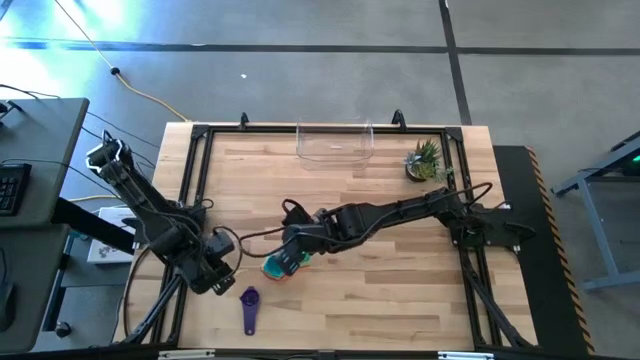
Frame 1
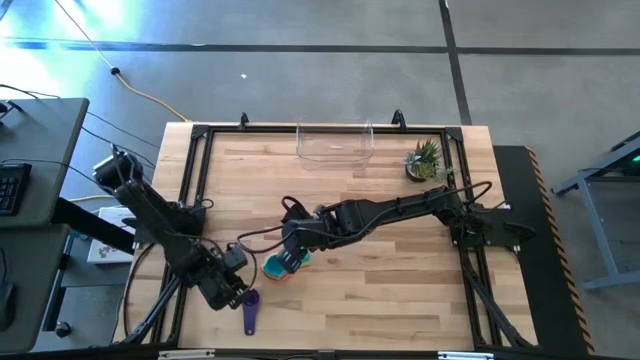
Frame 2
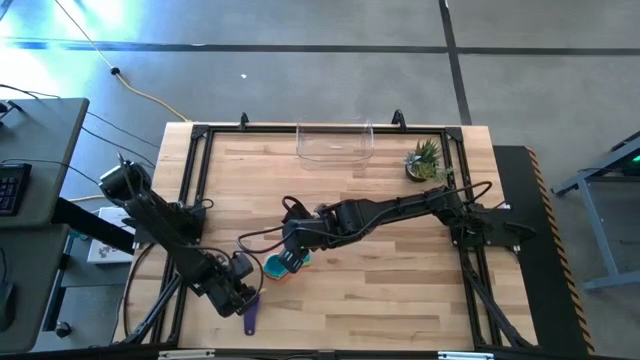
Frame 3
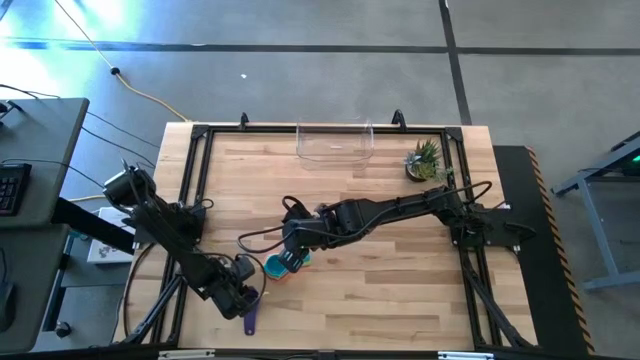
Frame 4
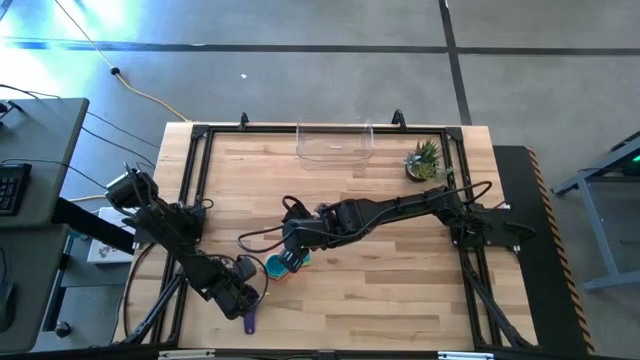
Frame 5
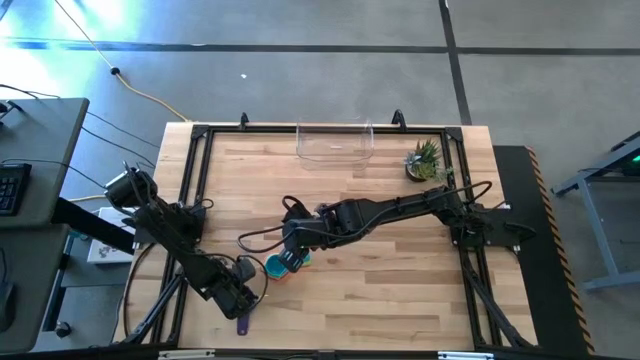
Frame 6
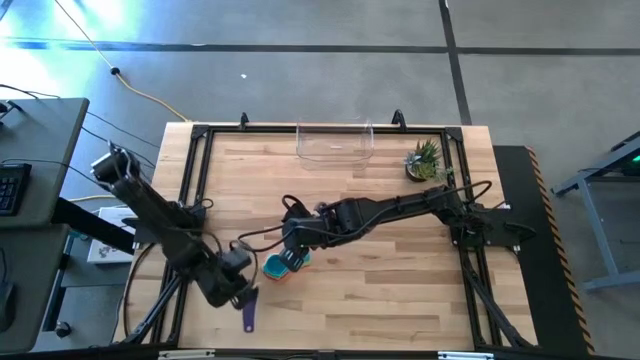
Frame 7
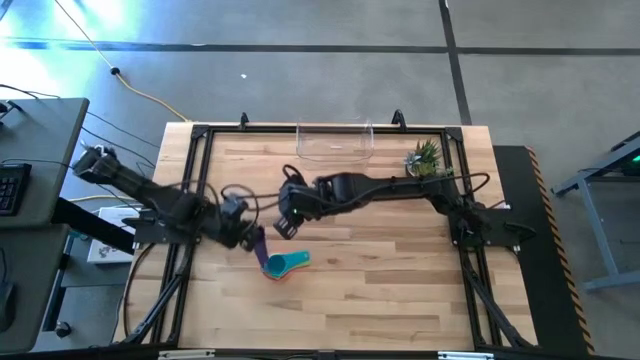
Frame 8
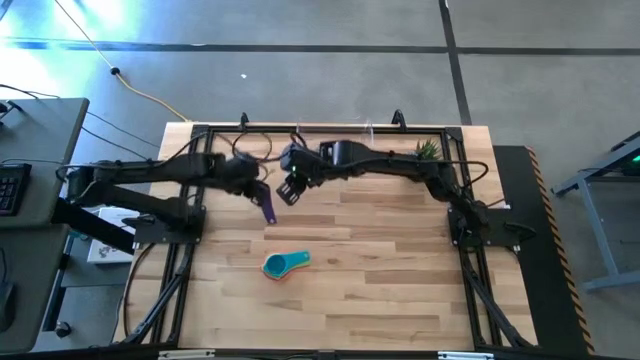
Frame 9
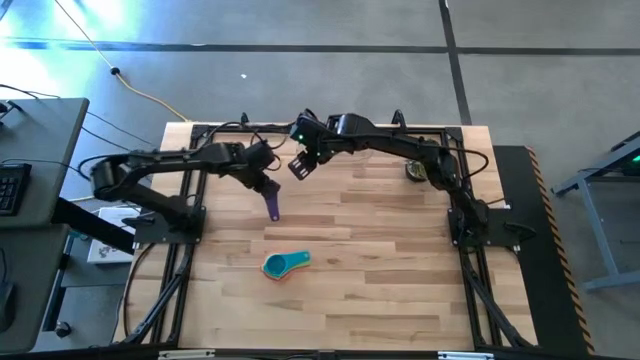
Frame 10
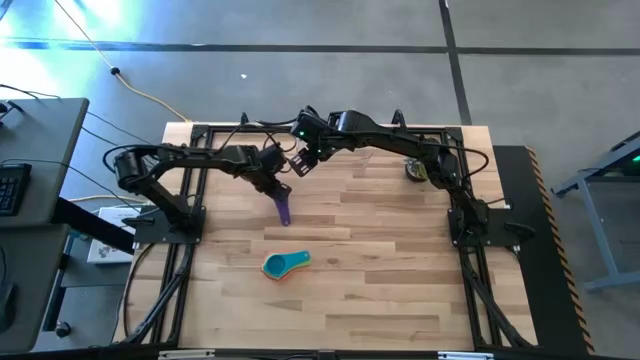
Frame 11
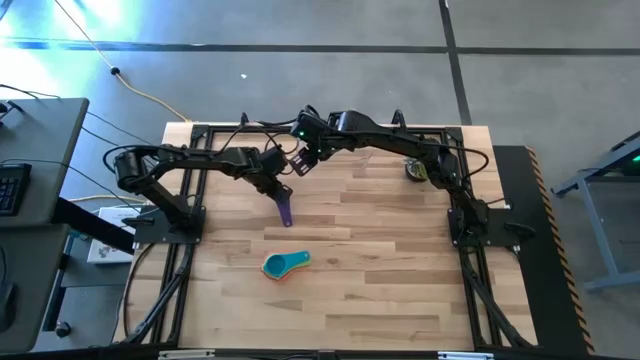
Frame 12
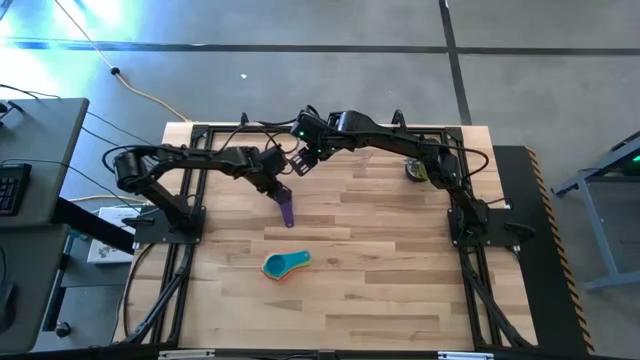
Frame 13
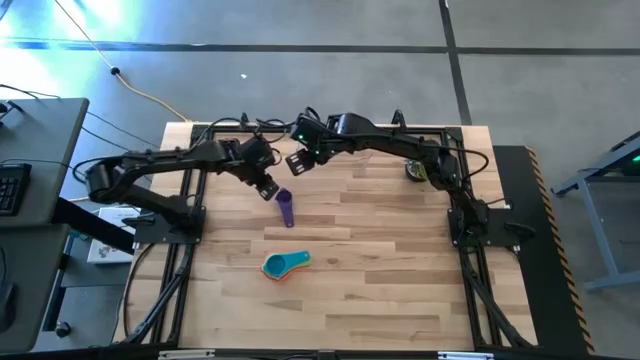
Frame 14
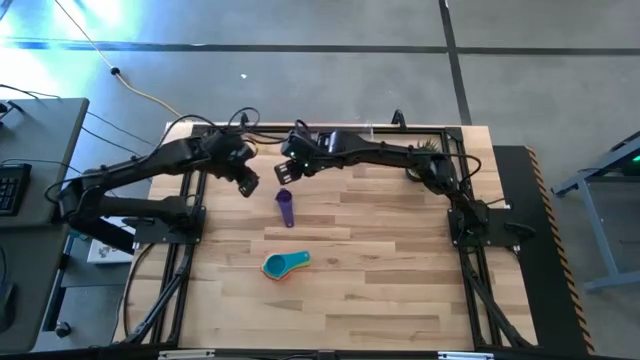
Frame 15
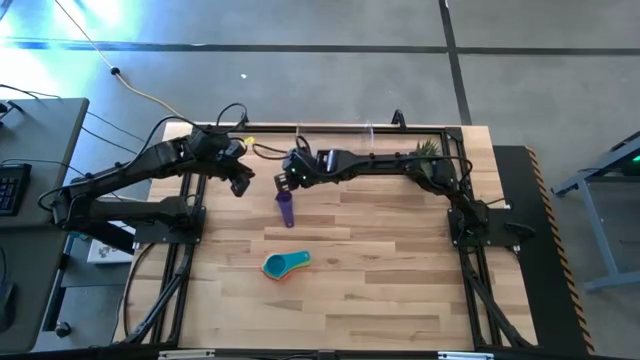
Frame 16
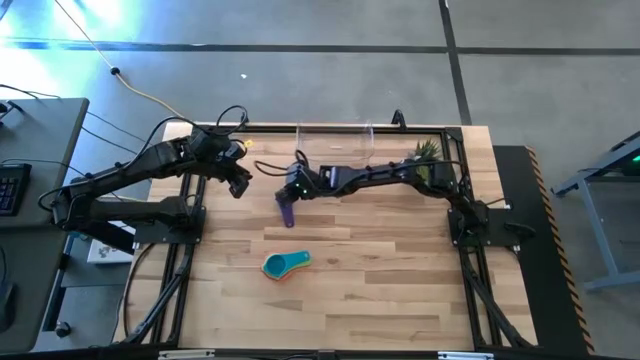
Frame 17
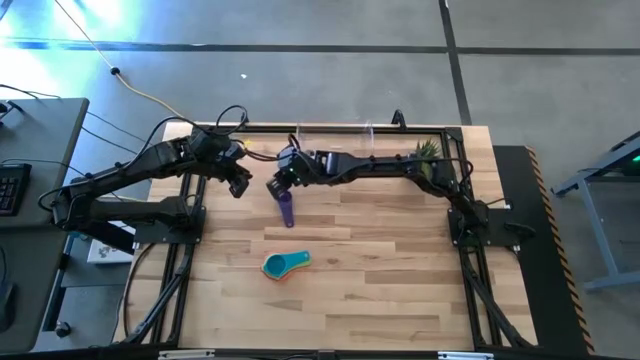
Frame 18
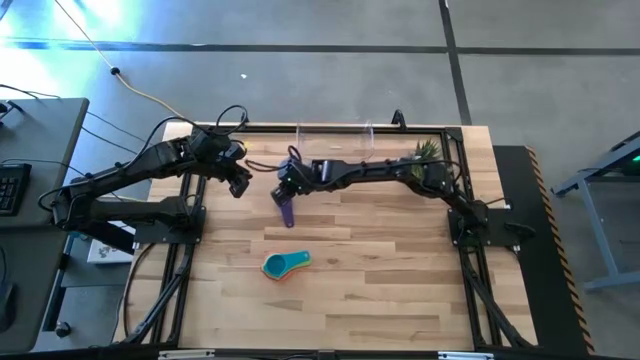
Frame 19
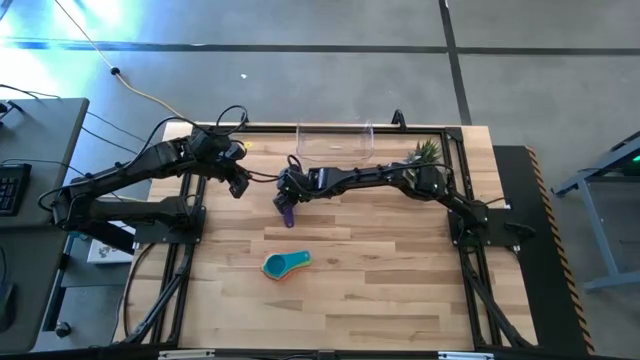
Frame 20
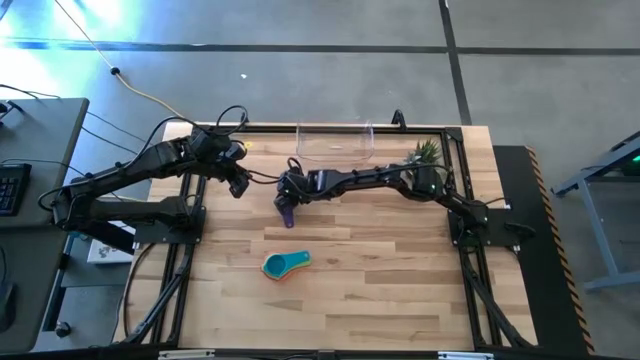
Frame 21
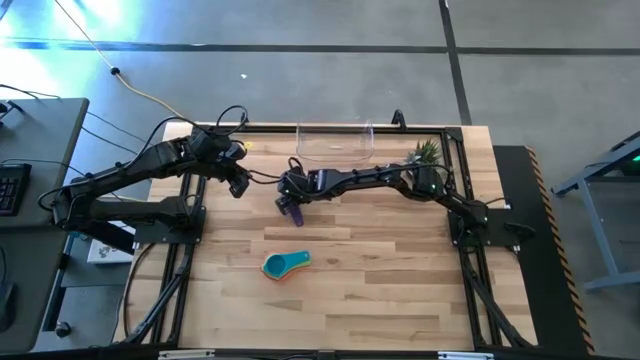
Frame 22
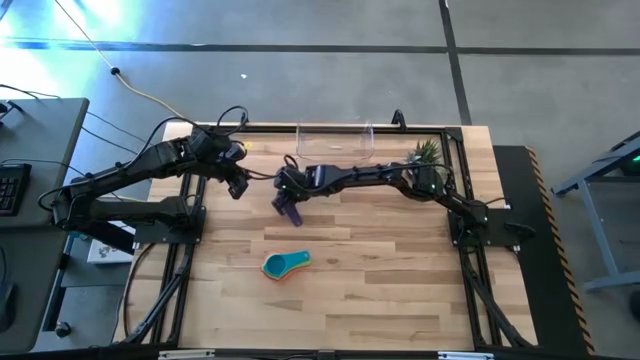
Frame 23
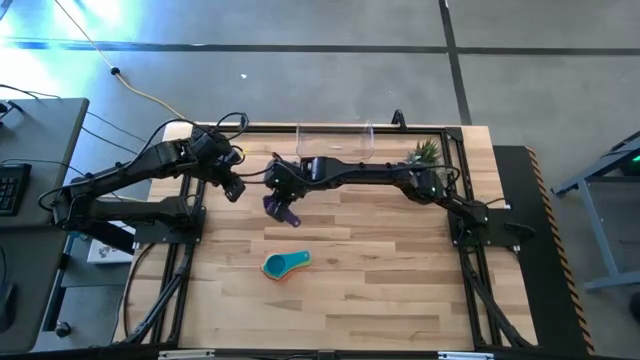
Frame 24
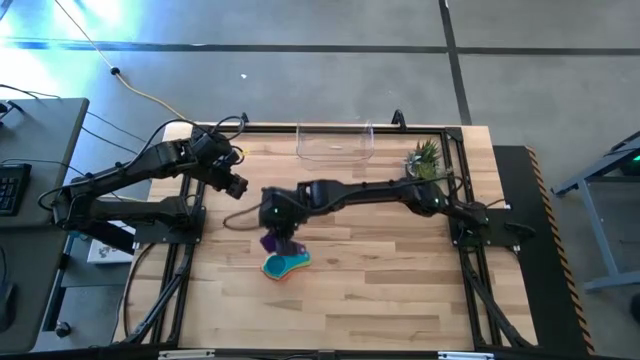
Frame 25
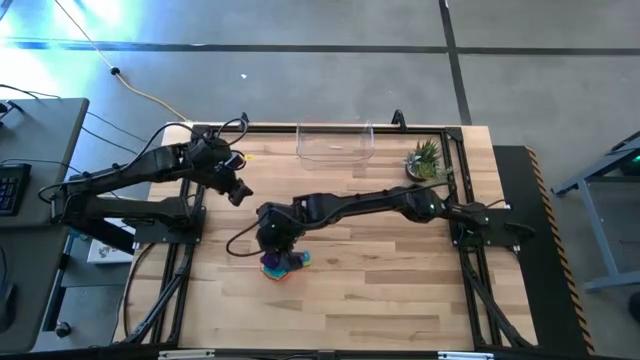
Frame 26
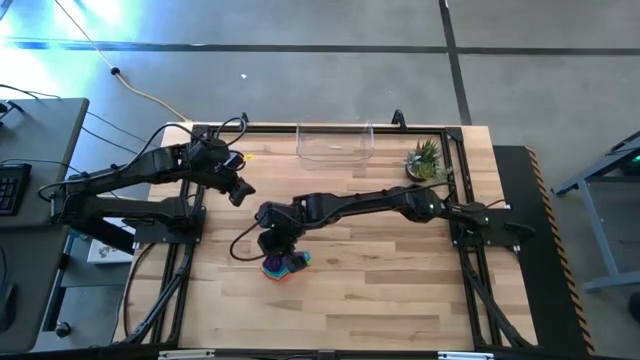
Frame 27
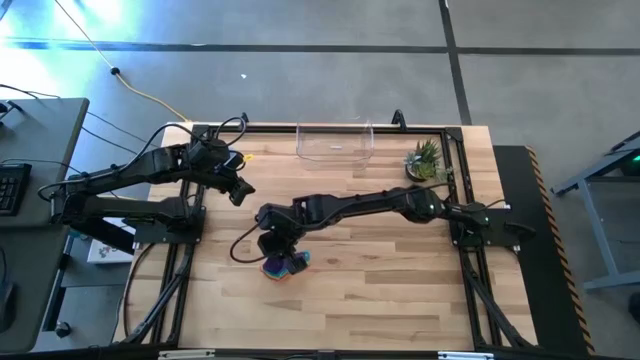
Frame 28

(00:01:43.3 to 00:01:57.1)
Task: Nest measuring cups in basket
Stack the dark blue measuring cup on top of the light blue measuring cup

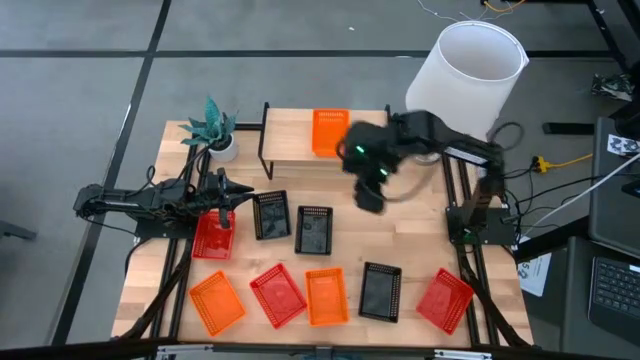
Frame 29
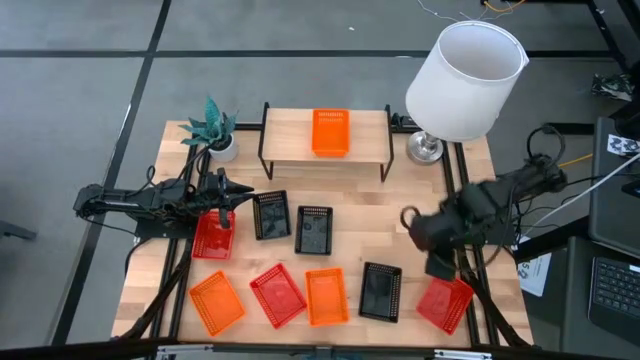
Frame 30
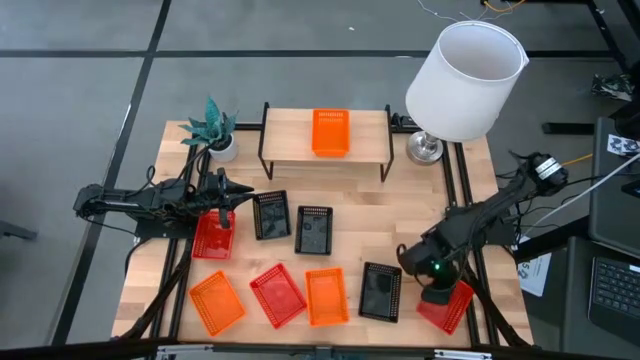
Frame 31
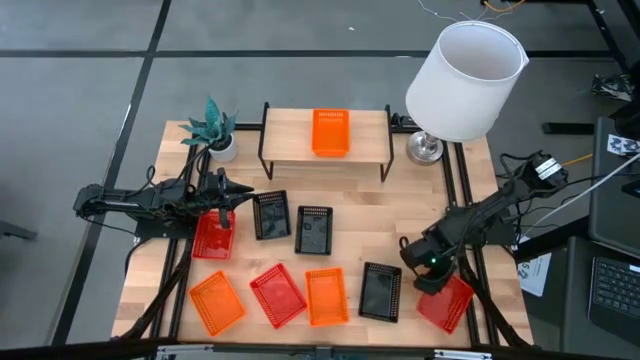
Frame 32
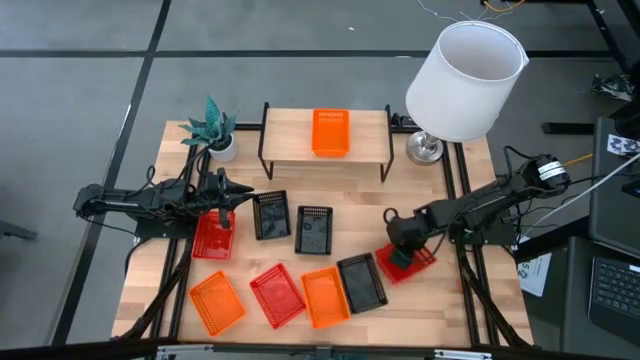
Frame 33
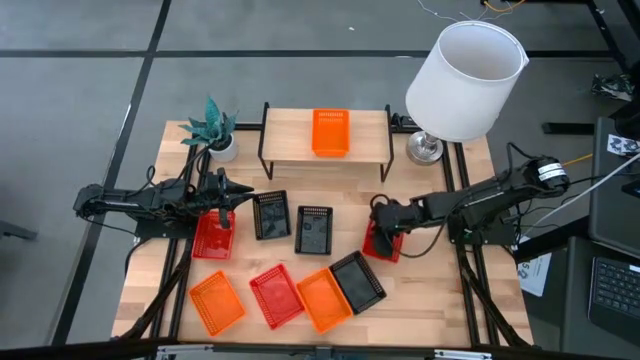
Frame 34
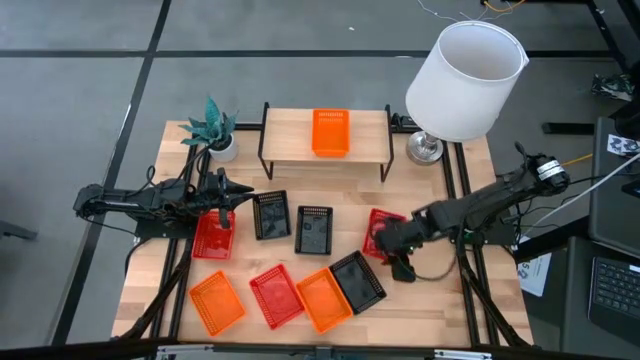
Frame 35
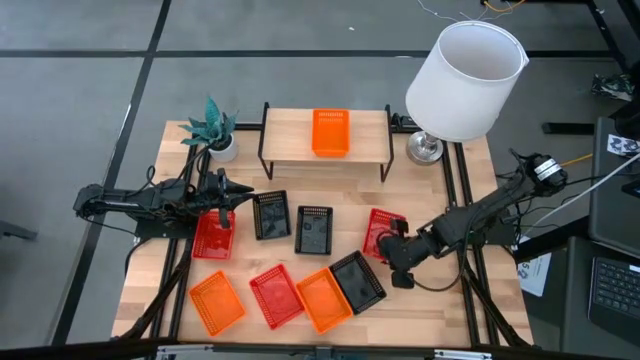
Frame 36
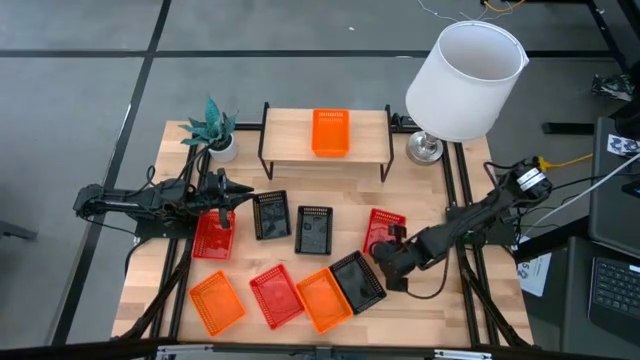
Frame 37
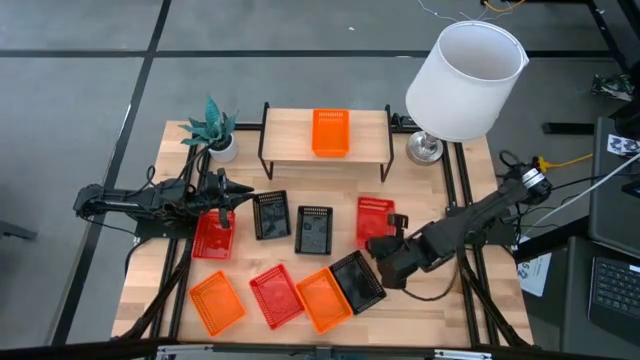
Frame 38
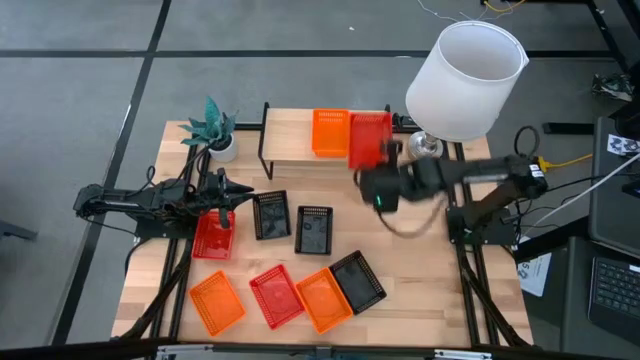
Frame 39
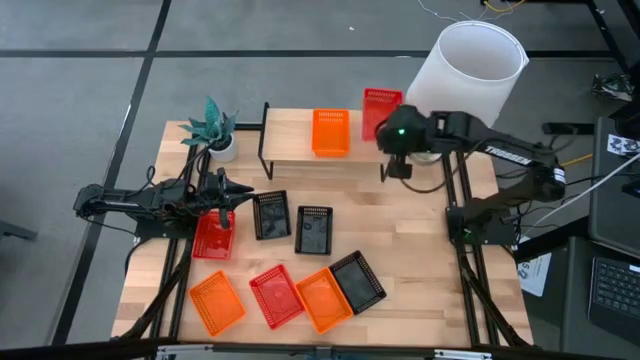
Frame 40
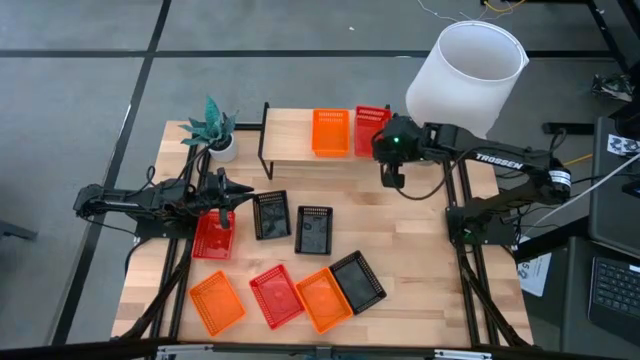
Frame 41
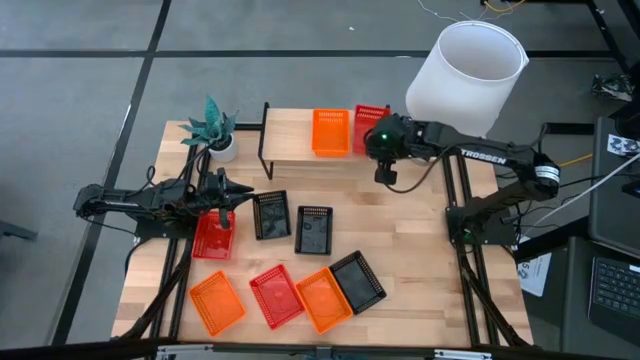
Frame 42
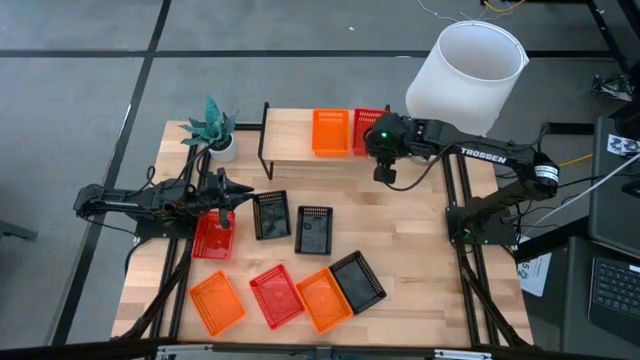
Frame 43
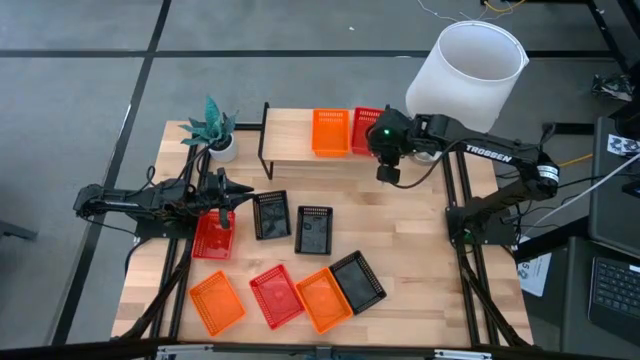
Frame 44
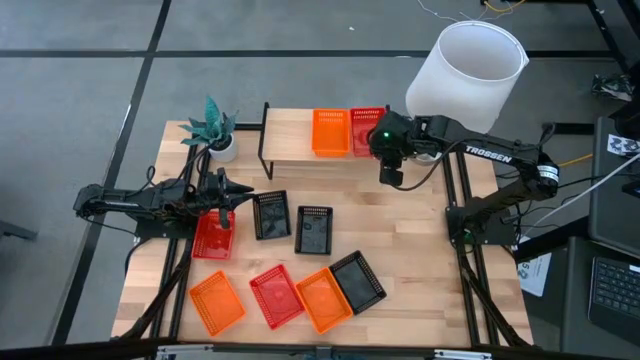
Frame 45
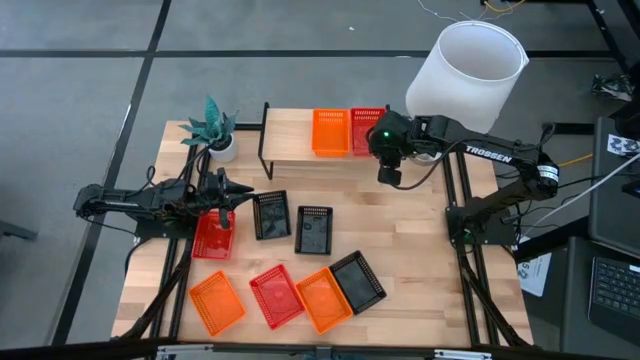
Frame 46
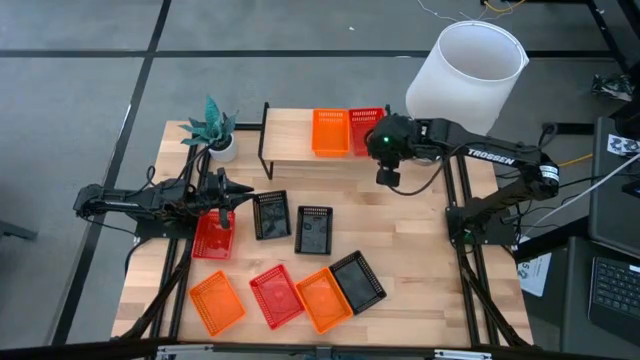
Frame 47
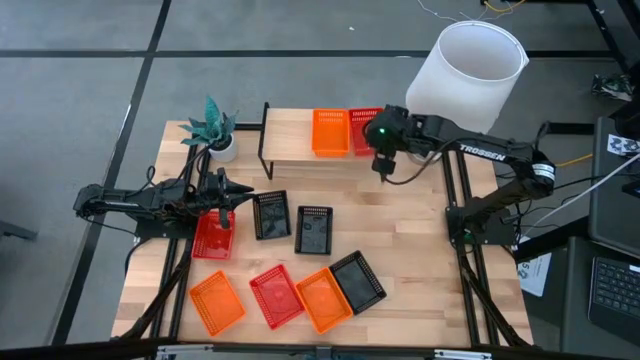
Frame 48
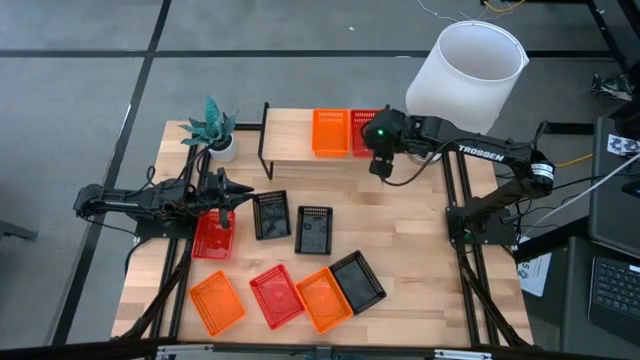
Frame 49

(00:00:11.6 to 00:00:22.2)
Task: Stack baskets on shelf by color
Put the bottom right red bin on the shelf
